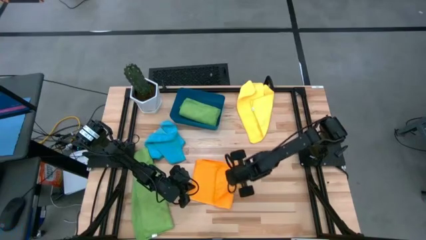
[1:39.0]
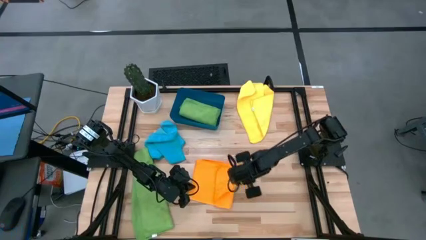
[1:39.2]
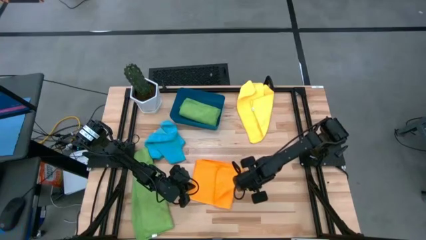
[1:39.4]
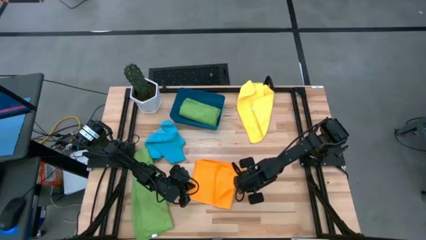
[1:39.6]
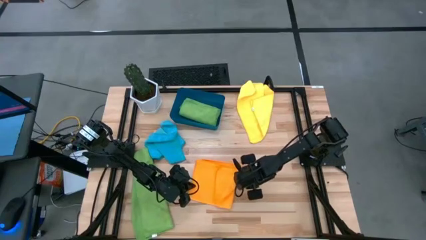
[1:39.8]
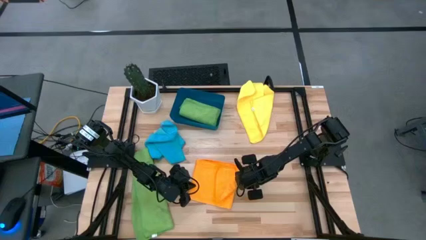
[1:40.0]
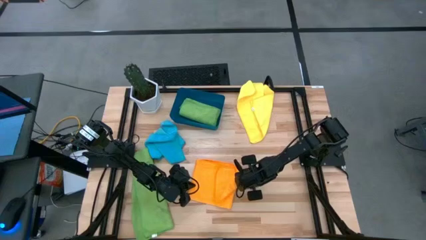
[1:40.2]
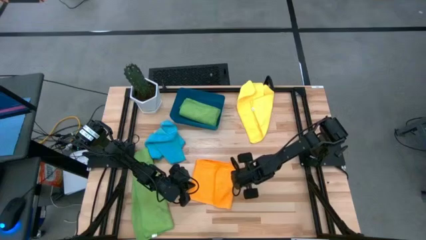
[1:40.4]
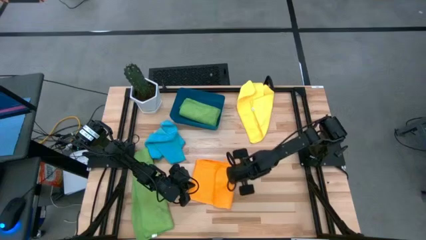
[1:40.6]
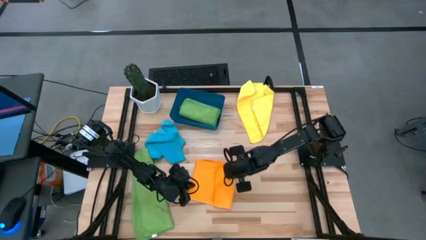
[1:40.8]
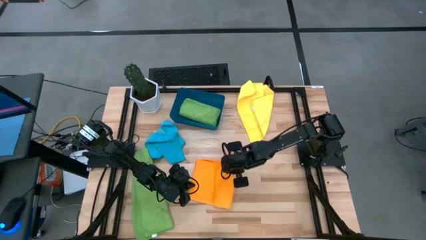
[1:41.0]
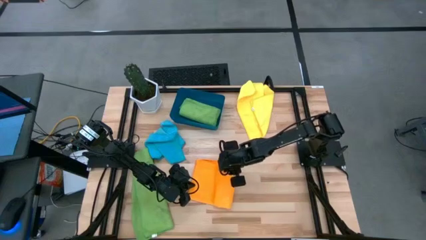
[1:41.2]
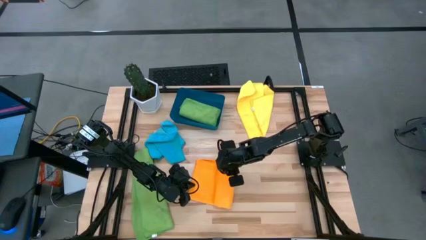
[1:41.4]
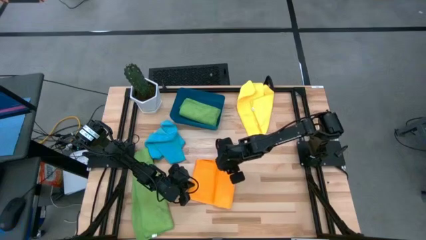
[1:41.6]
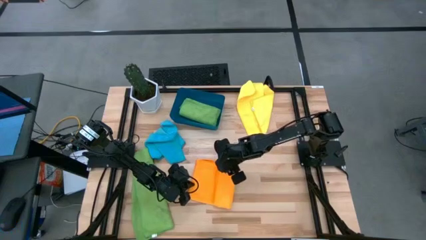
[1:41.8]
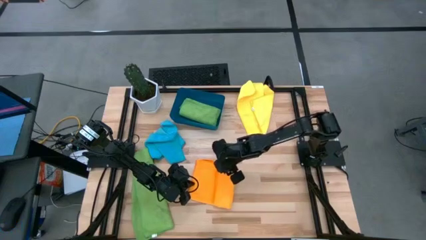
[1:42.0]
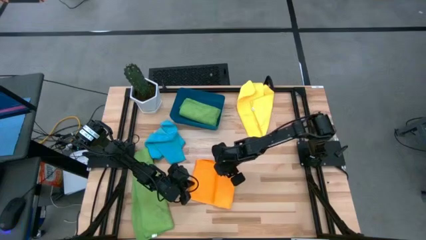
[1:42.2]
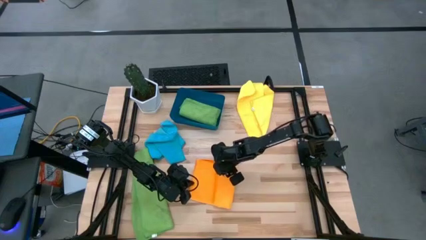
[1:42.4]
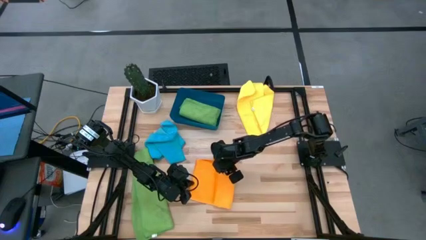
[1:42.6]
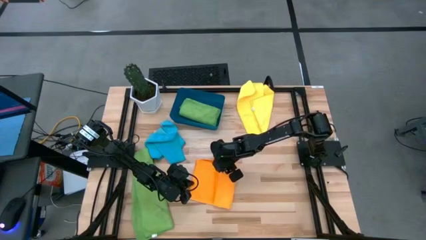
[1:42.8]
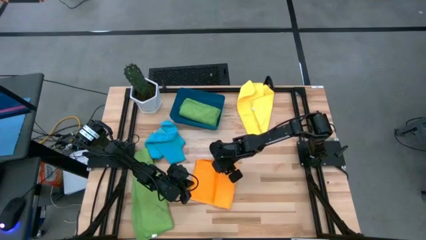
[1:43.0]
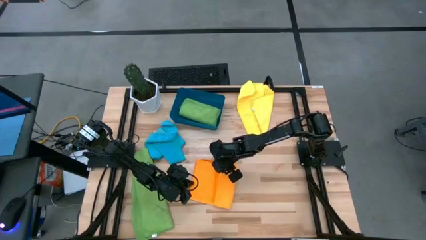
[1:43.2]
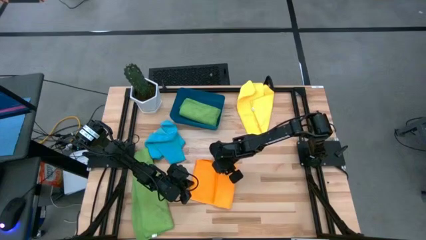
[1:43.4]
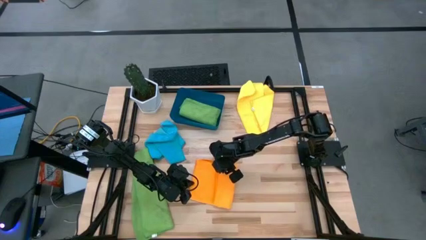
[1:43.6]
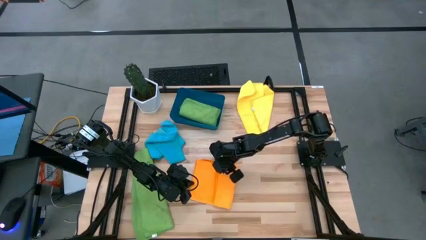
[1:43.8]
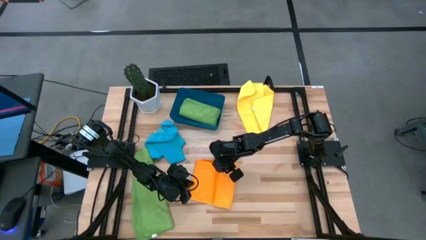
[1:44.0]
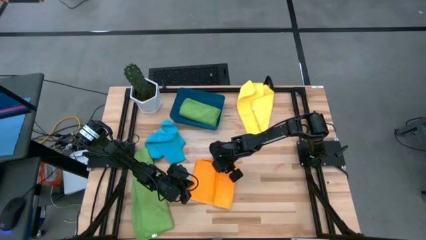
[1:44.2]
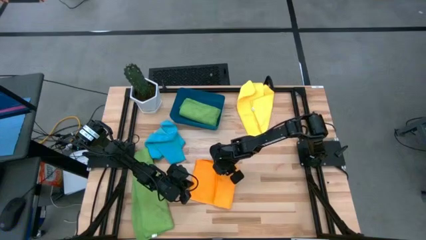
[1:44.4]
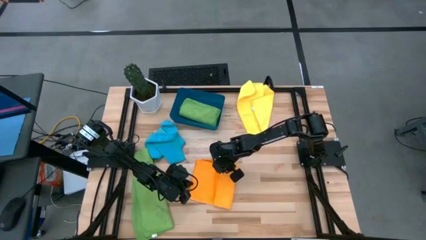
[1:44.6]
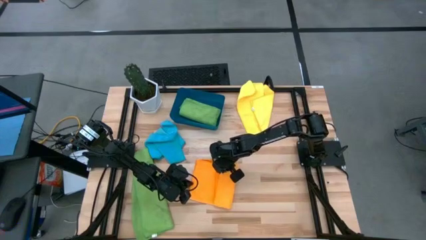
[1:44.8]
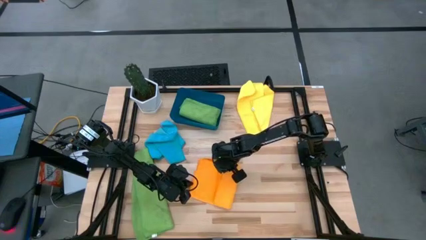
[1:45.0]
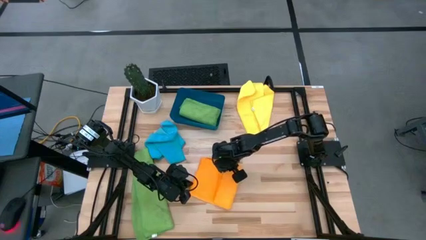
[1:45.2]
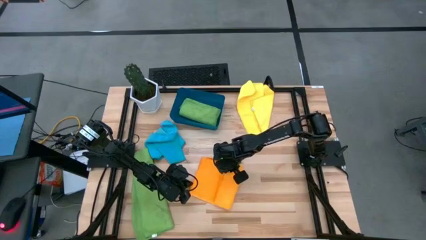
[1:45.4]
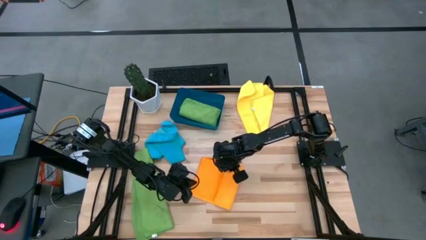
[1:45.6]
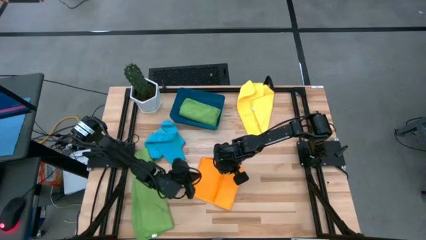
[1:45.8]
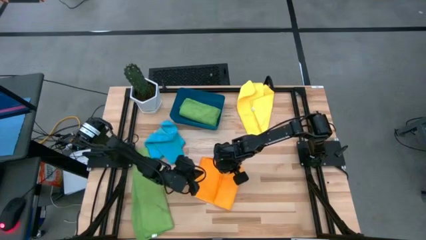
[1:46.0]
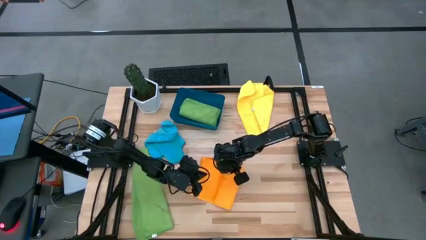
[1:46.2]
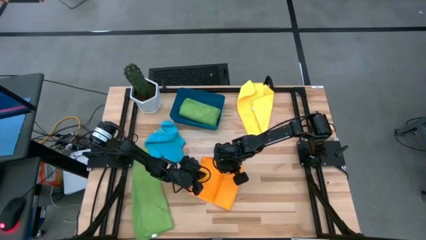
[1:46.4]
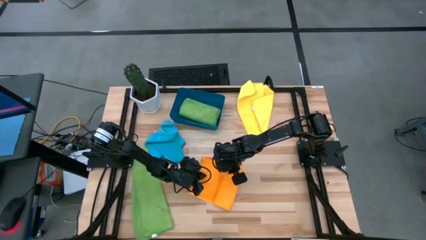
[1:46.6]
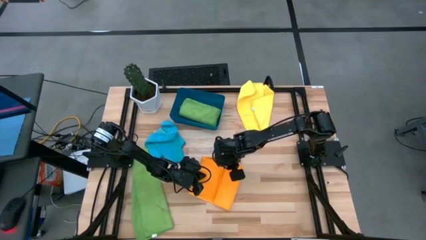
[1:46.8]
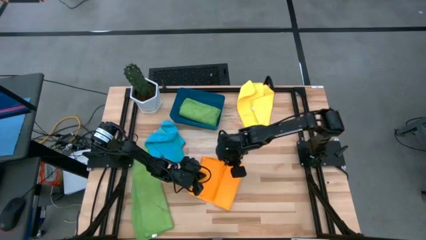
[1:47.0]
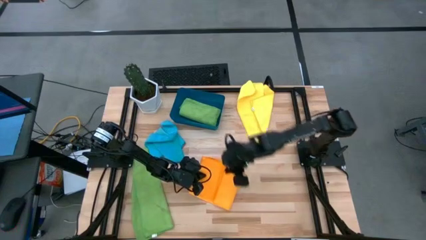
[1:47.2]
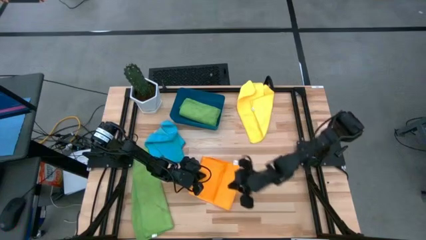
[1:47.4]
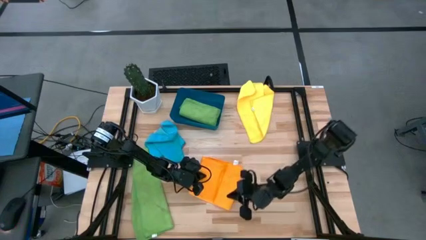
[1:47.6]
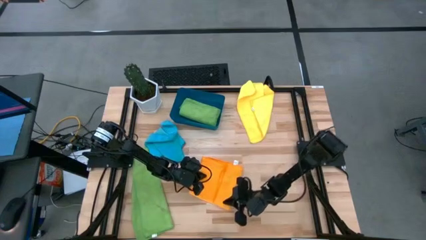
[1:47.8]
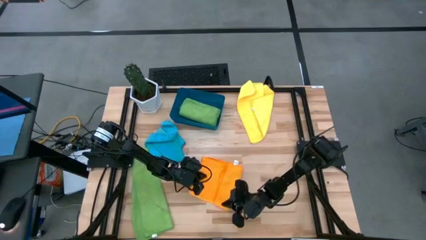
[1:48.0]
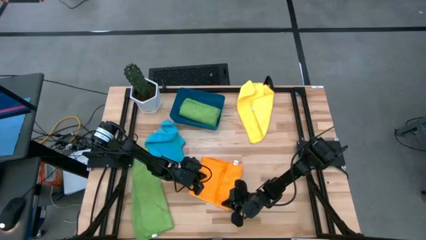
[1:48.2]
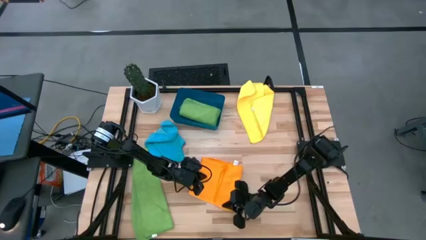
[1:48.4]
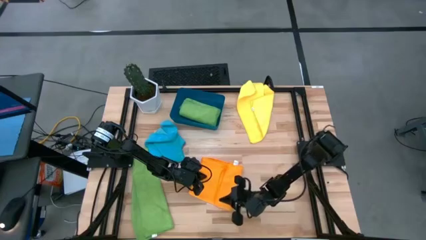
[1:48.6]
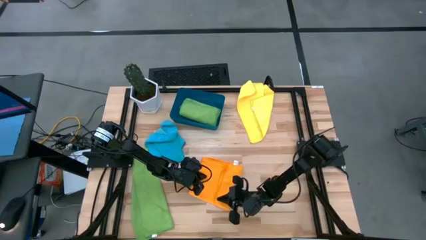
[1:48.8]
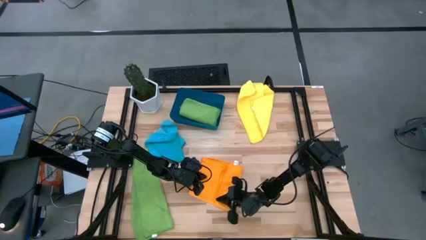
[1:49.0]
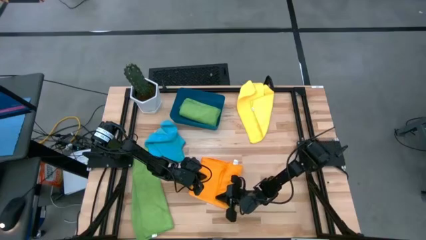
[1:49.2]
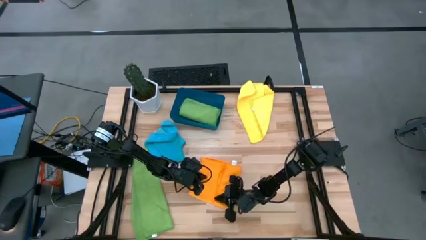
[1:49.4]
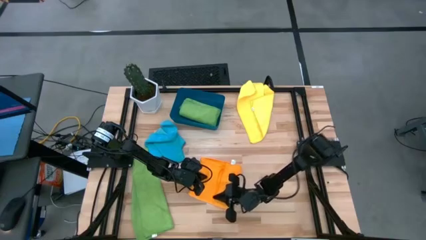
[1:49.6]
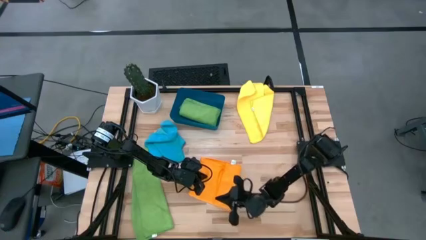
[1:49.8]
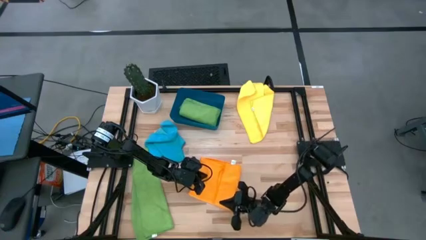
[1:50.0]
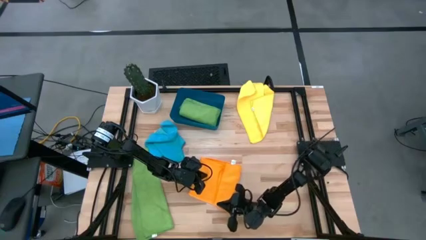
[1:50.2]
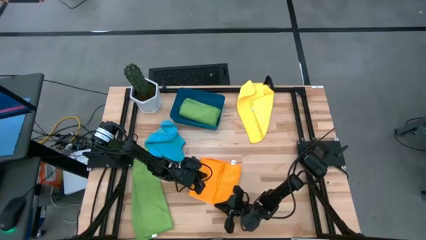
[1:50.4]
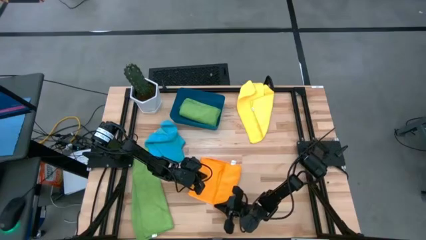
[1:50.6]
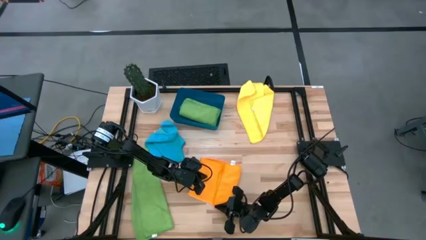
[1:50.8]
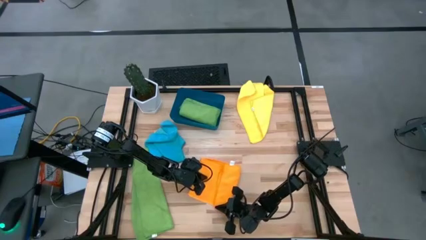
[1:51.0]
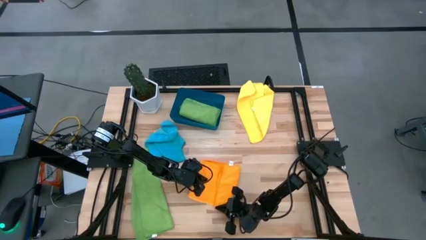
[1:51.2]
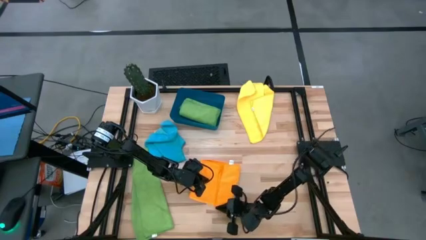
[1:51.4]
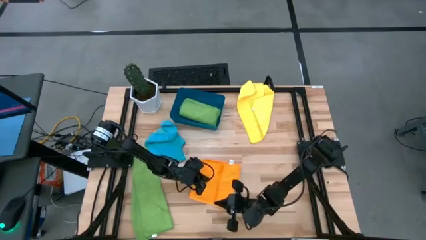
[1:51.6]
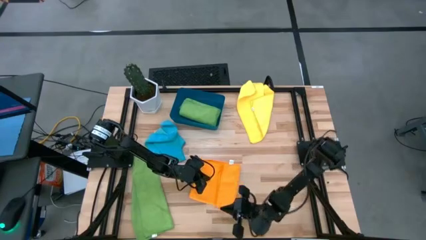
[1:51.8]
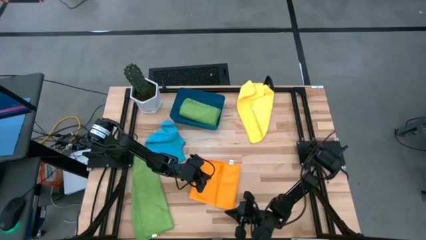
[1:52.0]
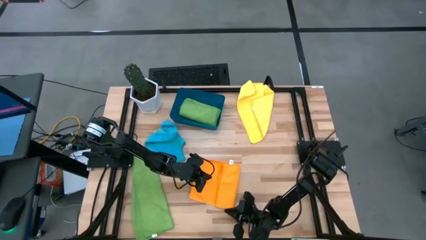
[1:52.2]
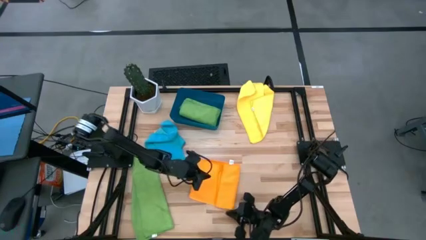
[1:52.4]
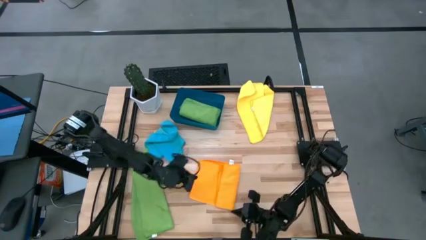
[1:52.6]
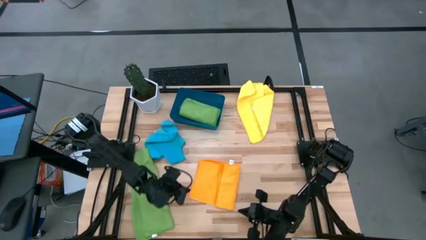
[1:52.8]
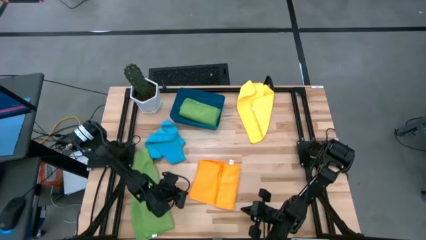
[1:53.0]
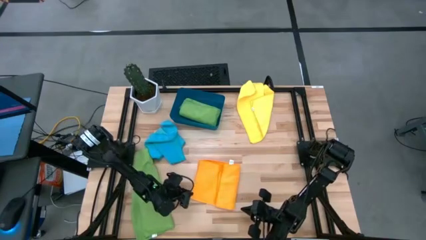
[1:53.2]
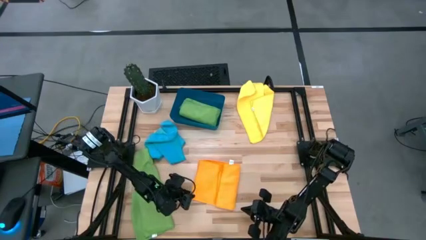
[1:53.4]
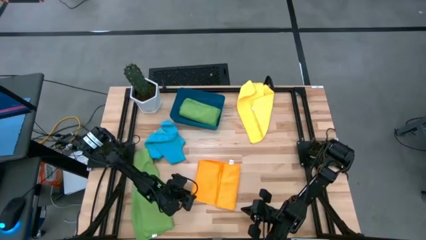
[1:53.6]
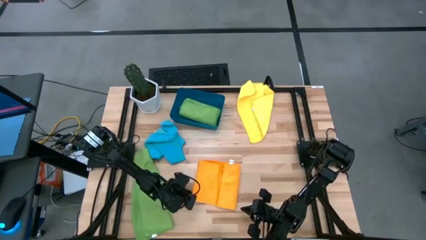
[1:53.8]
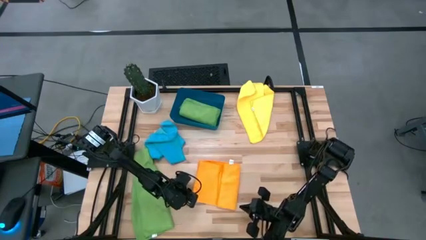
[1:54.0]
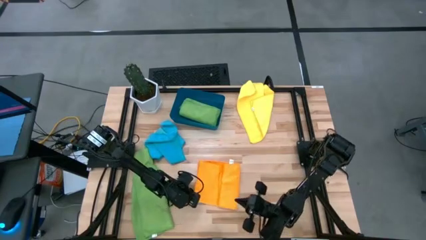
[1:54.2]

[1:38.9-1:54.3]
Task: Fold microfiber towels
Fold the orange towel
